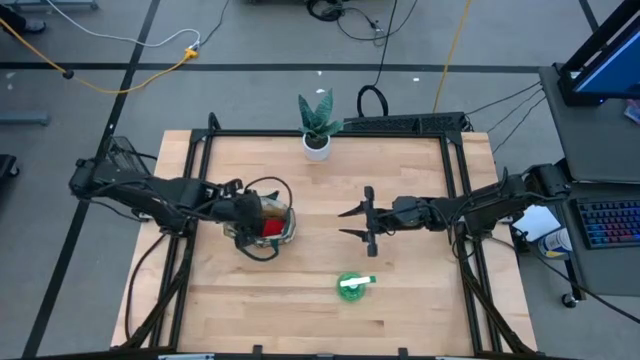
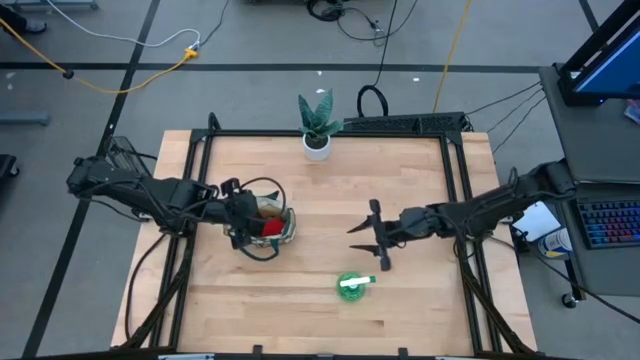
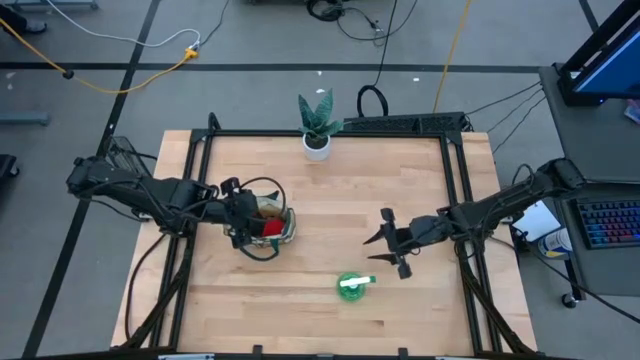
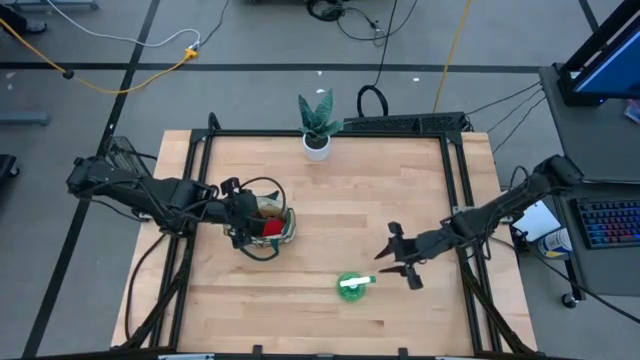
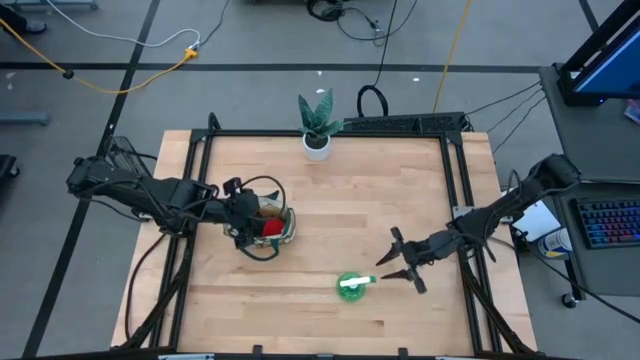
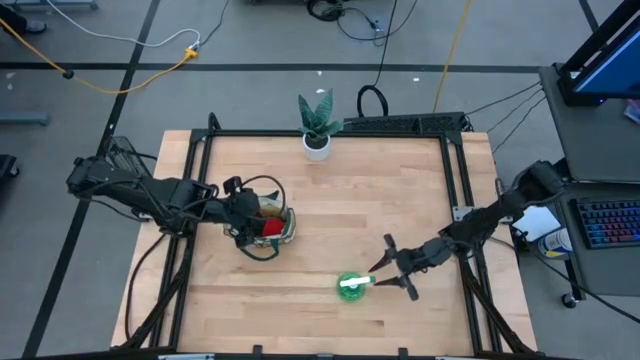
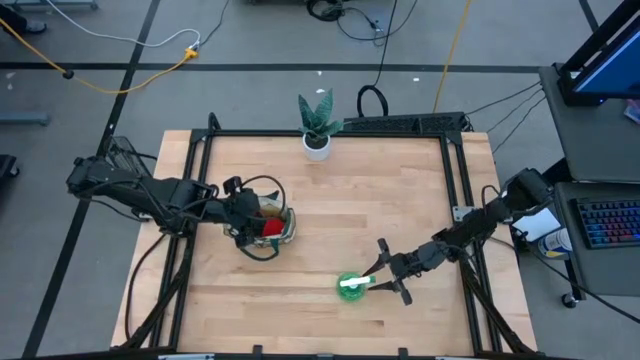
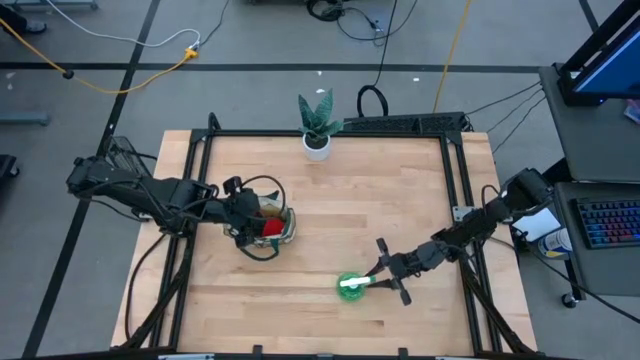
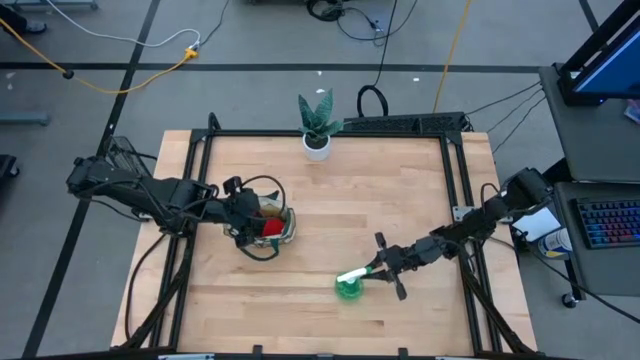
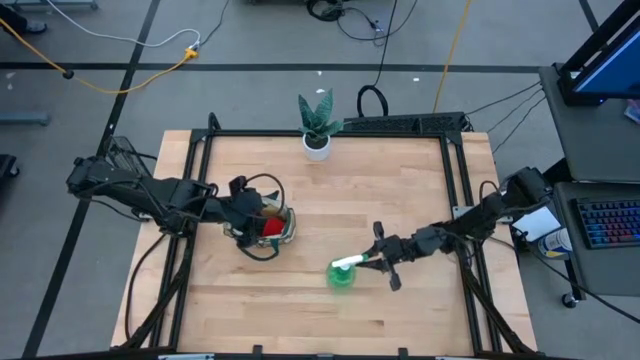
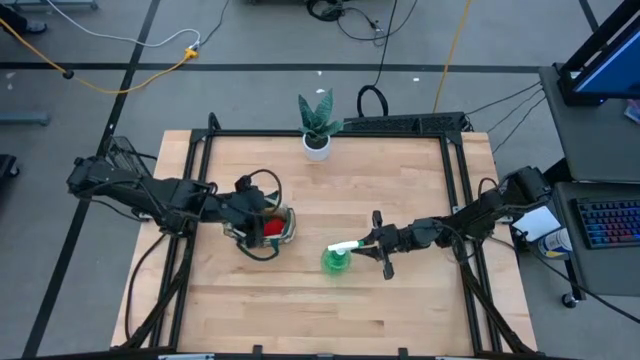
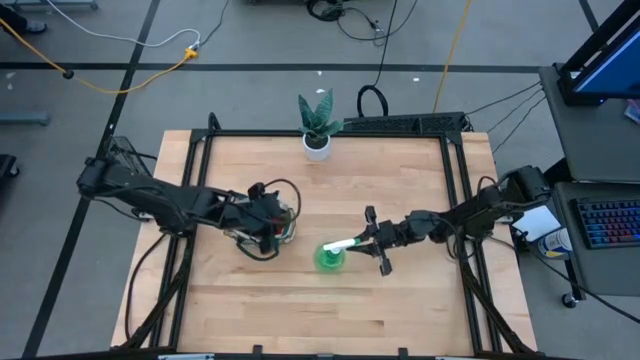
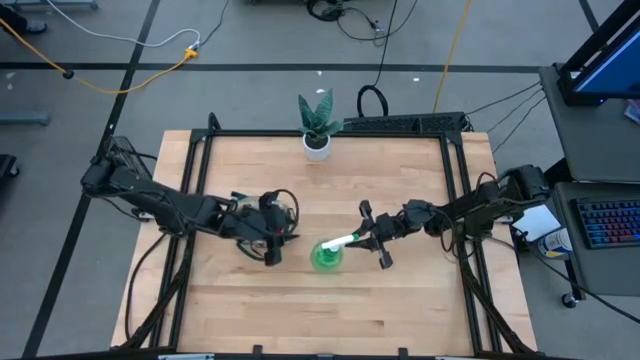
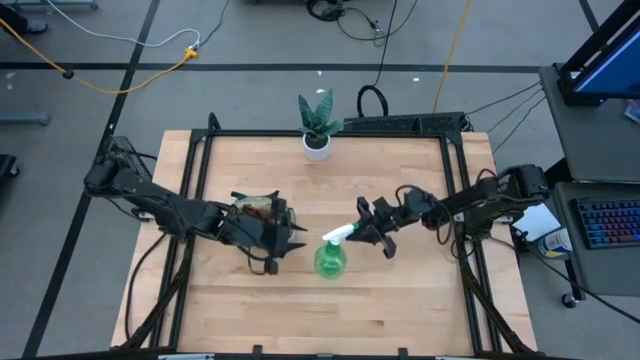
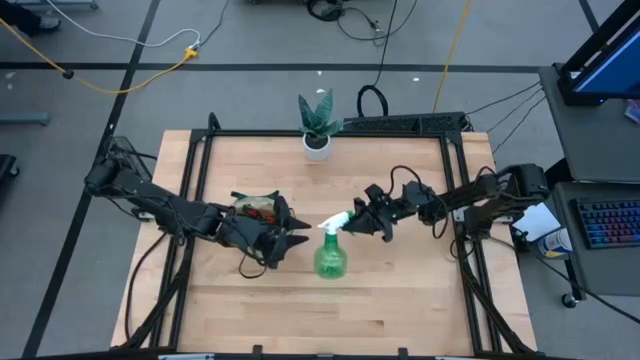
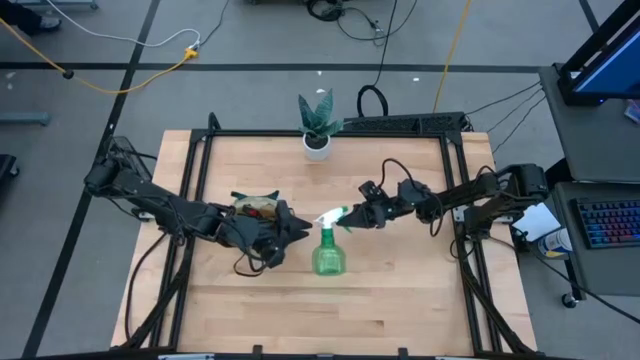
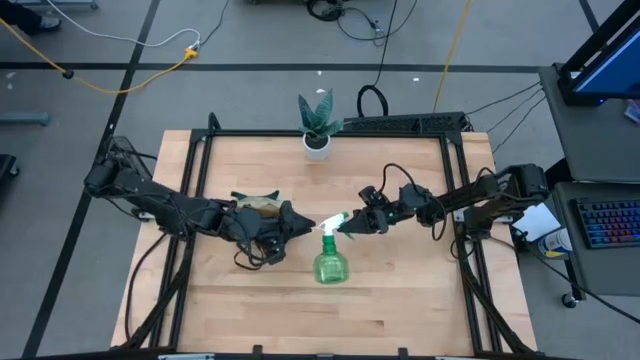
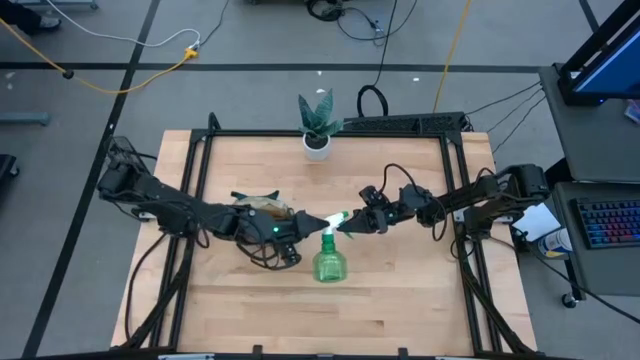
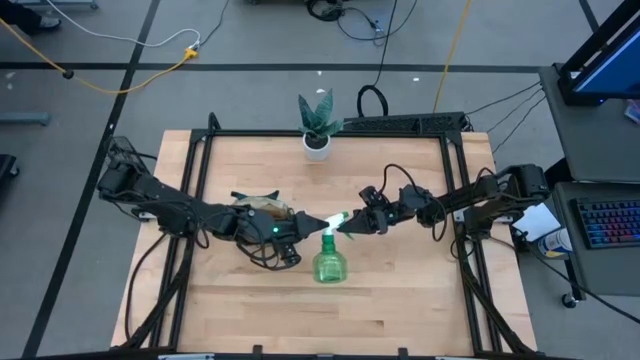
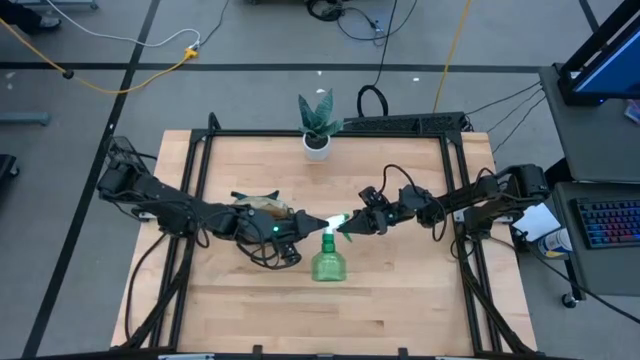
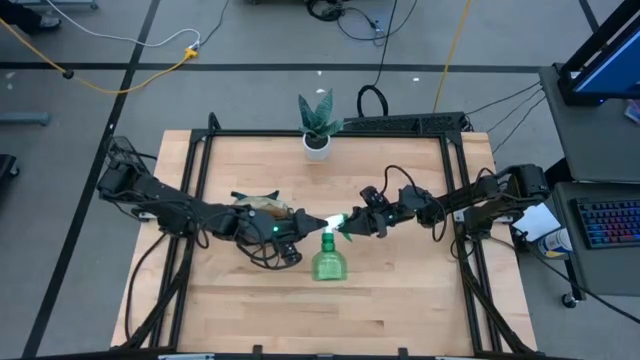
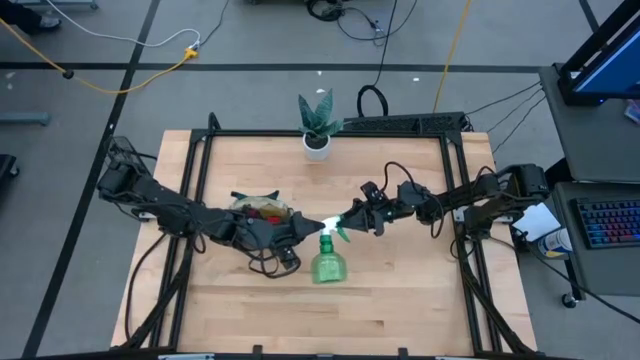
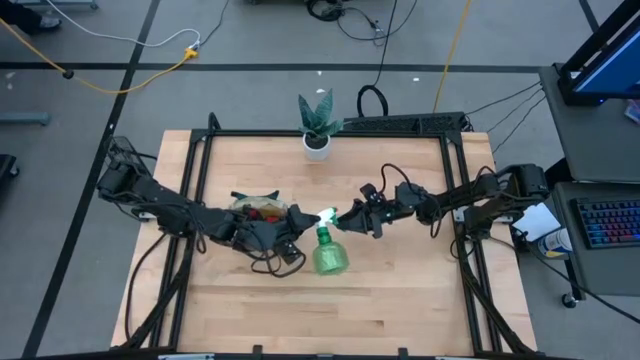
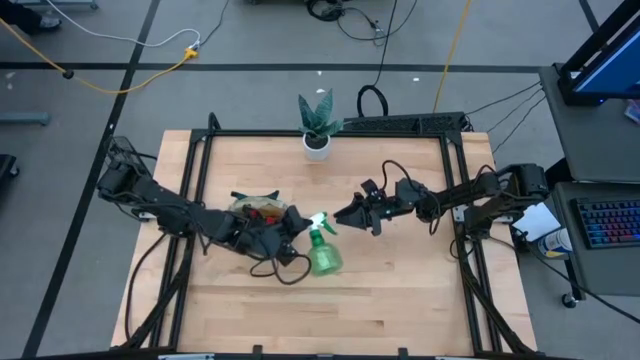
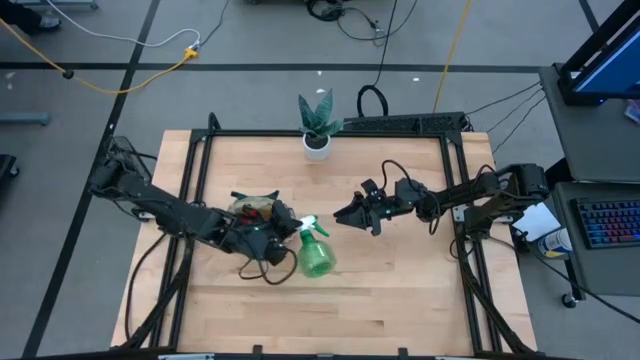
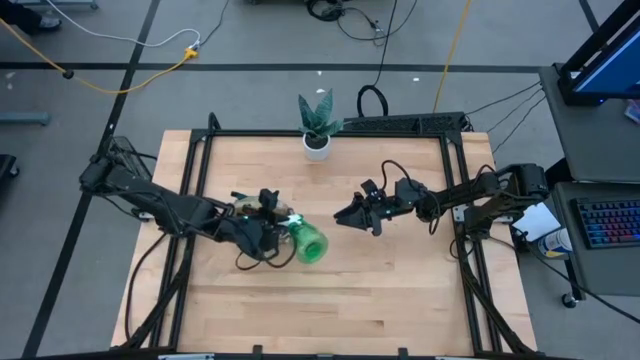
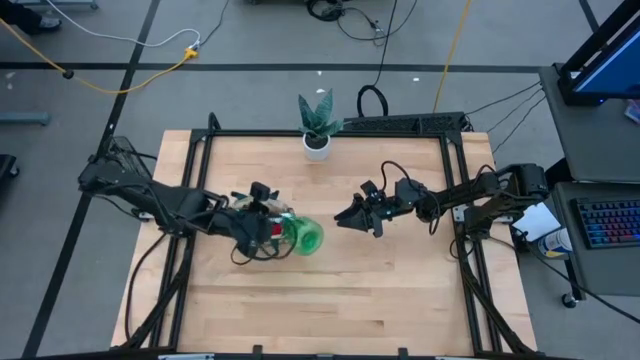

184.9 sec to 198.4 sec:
Task: Pick & Place Garden tools in Gardening bag
Put the green spray bottle into the white gardening bag

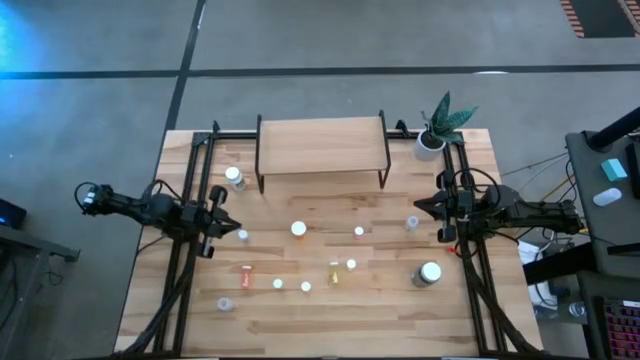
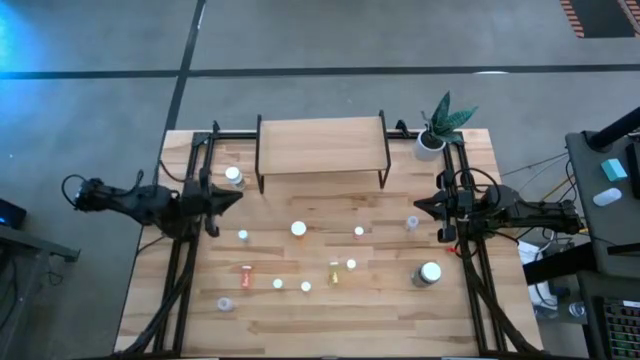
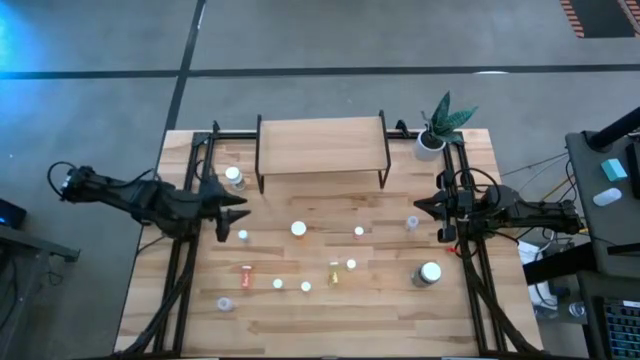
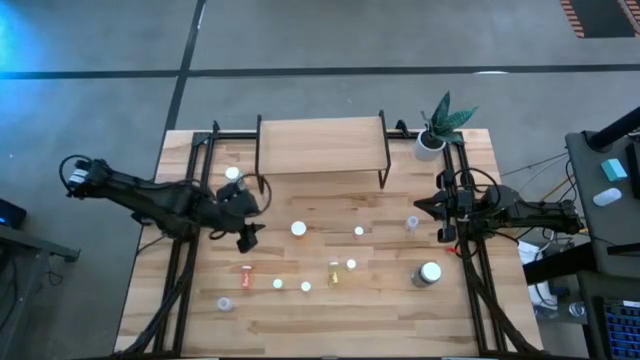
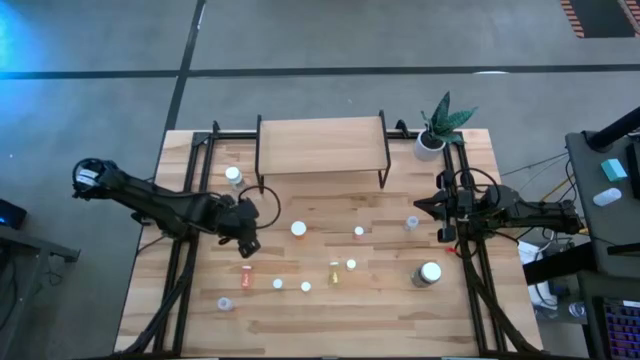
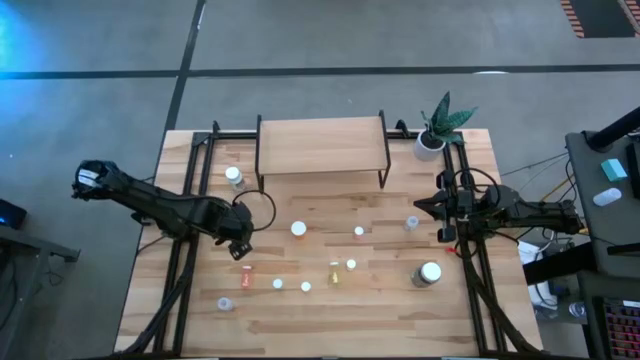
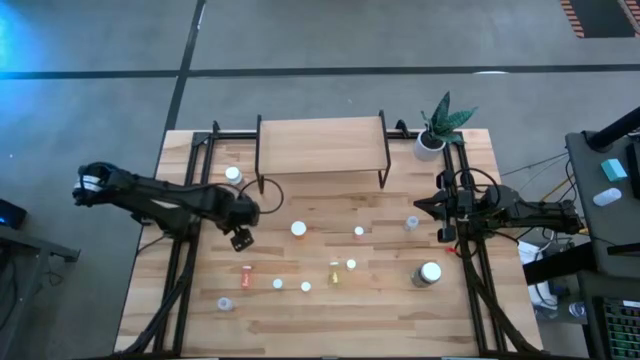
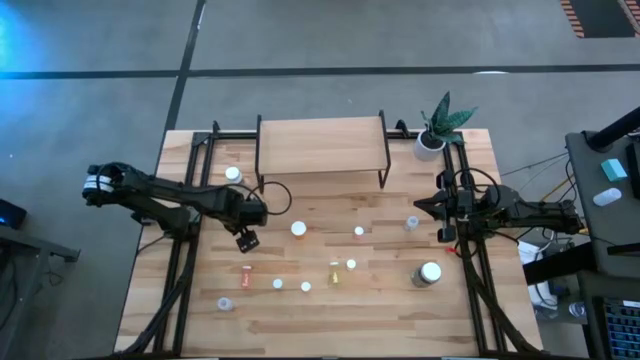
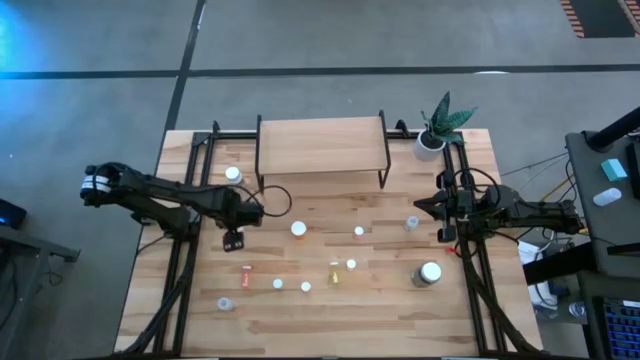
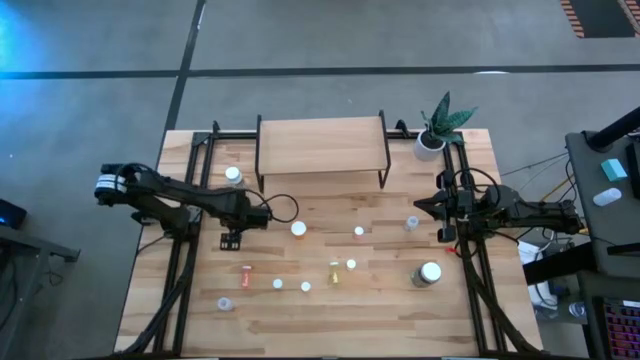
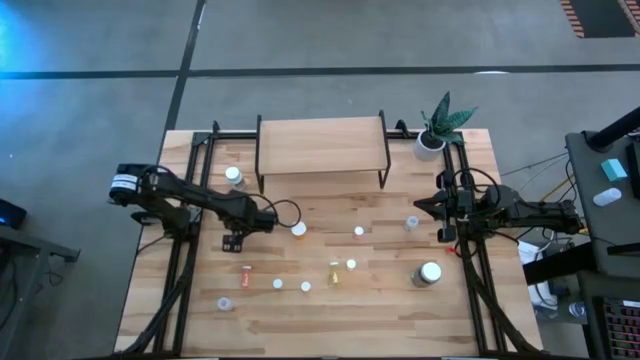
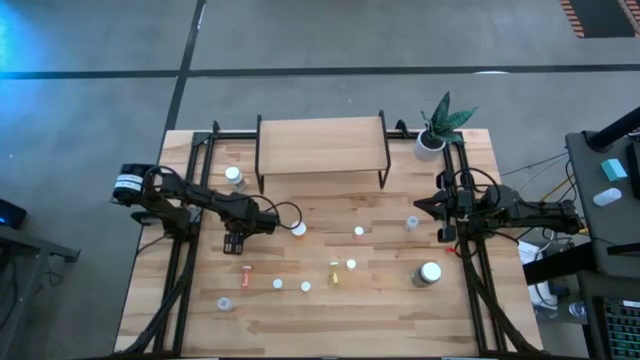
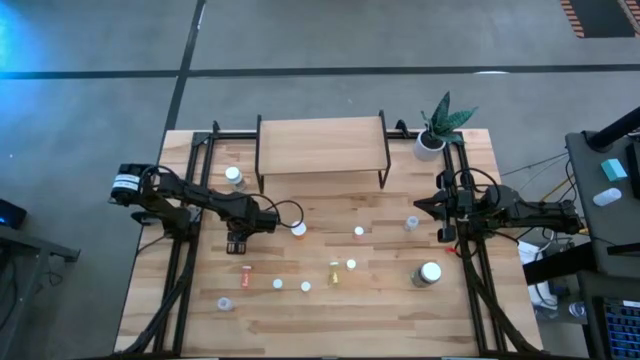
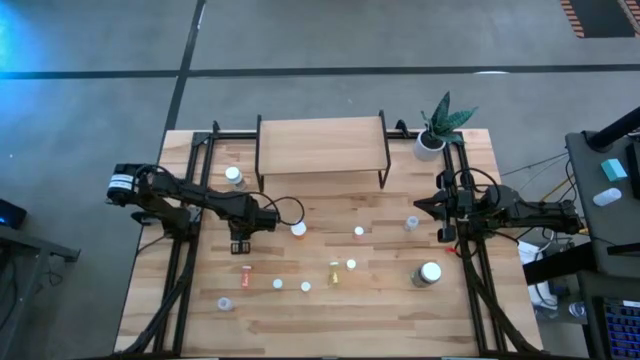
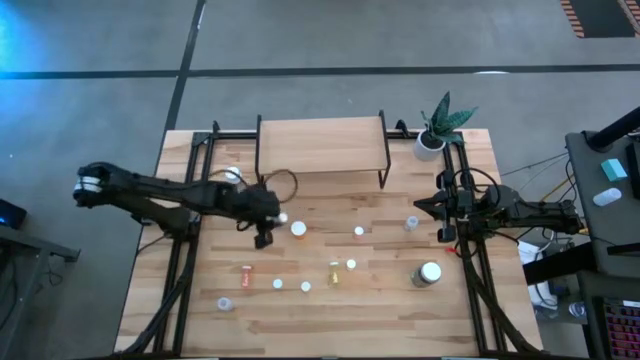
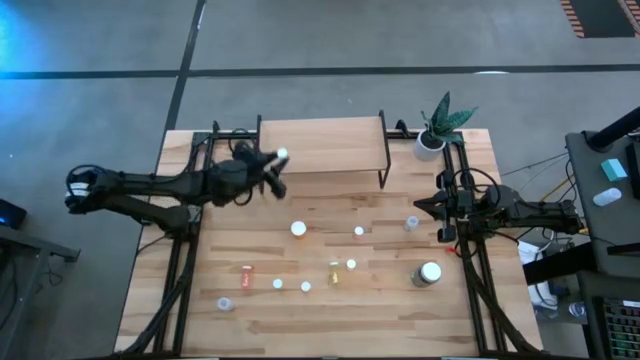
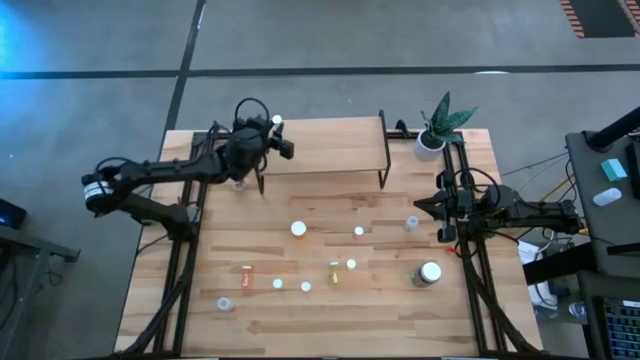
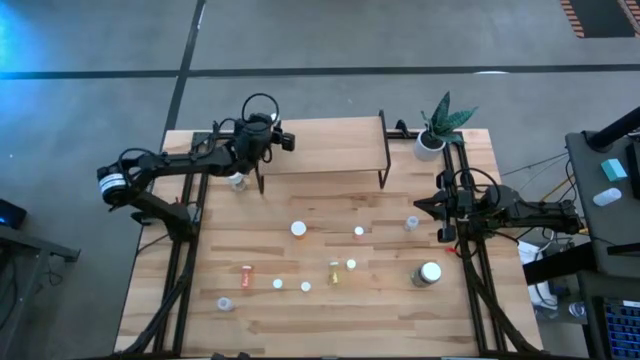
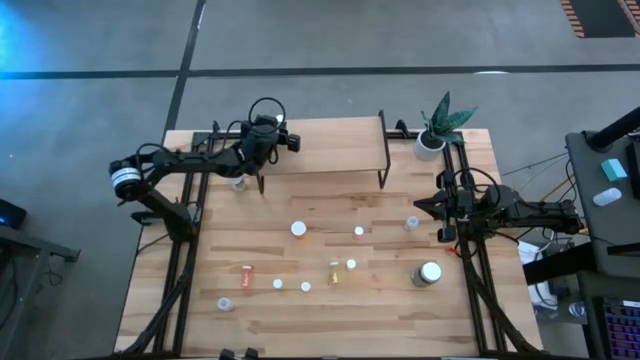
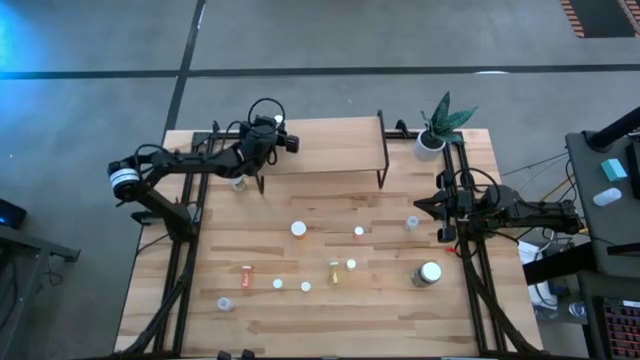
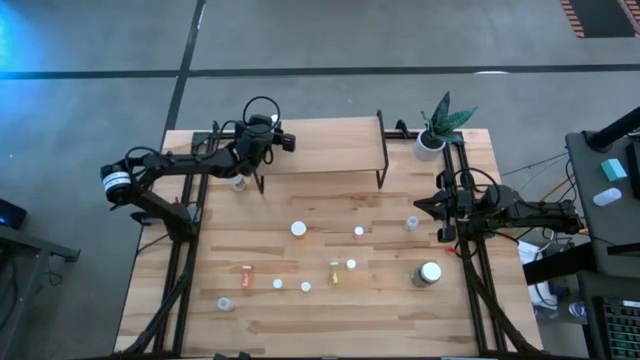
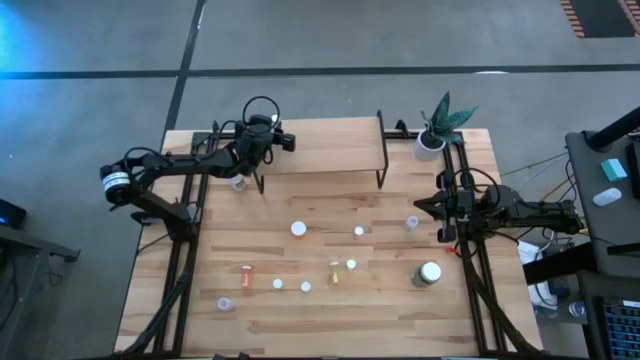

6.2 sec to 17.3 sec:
Task: Pick and place medicine bottles onto shelf by color
Put the top blue medicine bottle on the shelf
